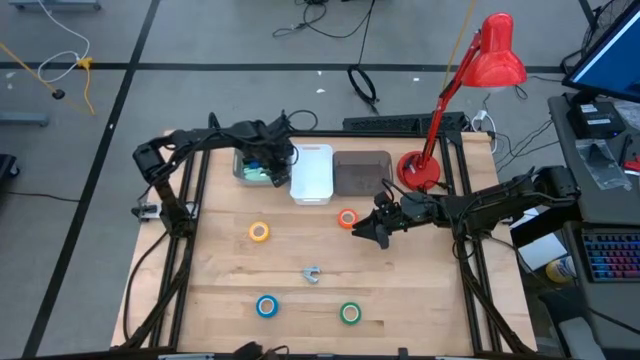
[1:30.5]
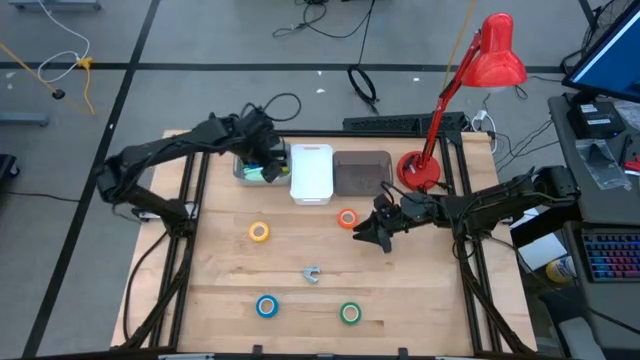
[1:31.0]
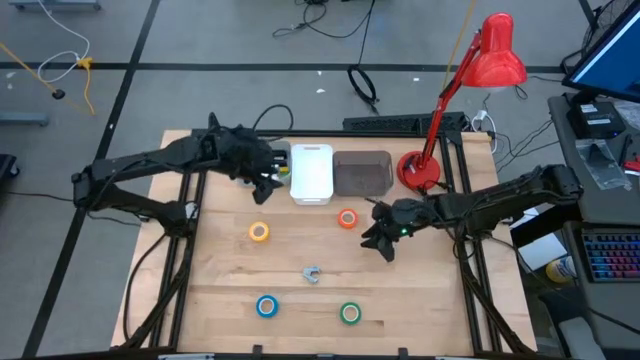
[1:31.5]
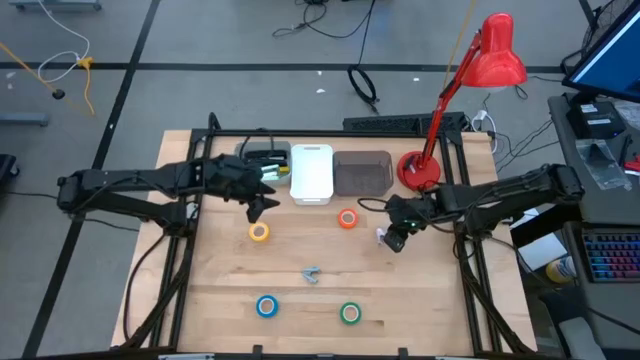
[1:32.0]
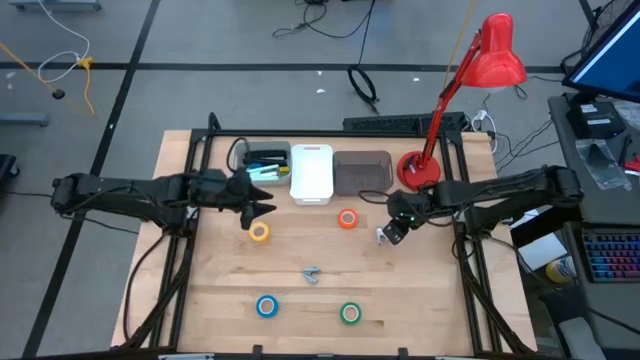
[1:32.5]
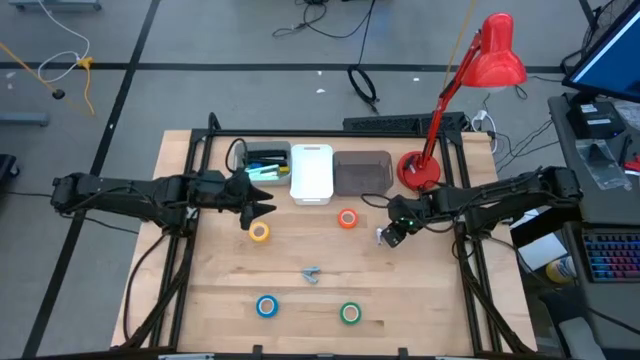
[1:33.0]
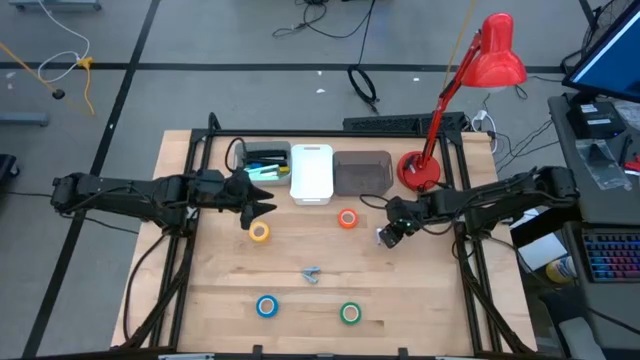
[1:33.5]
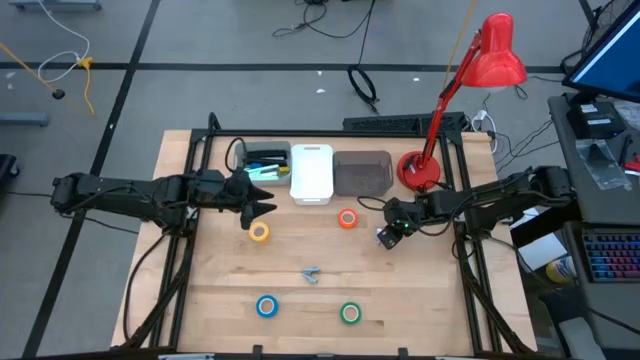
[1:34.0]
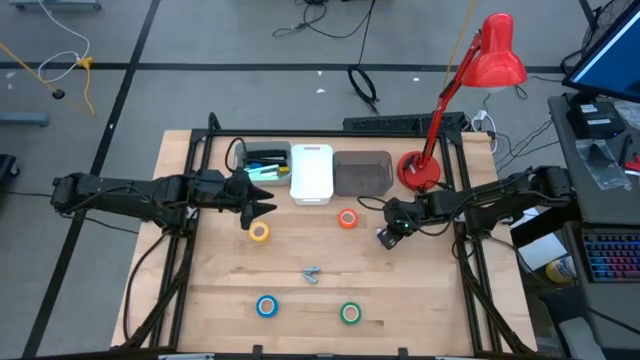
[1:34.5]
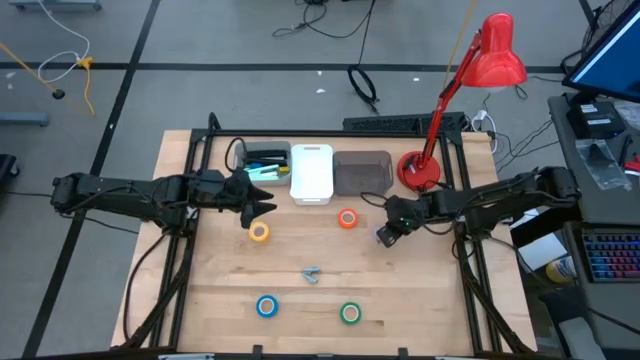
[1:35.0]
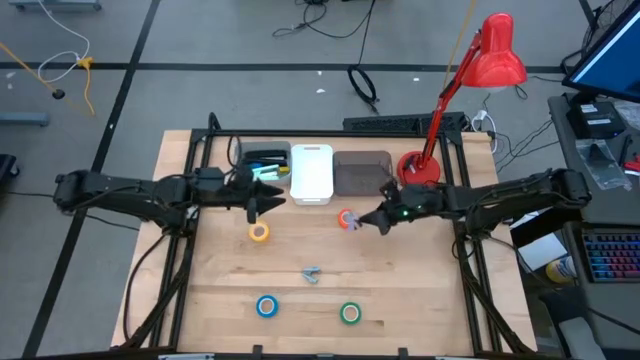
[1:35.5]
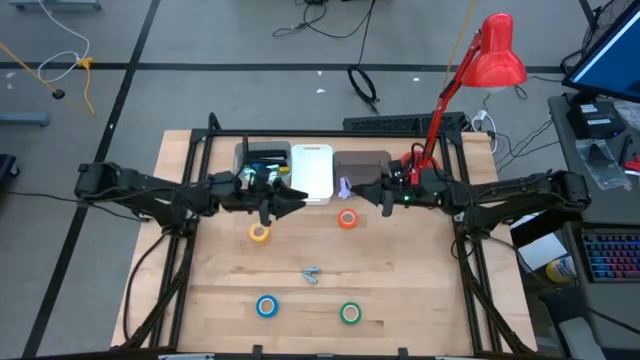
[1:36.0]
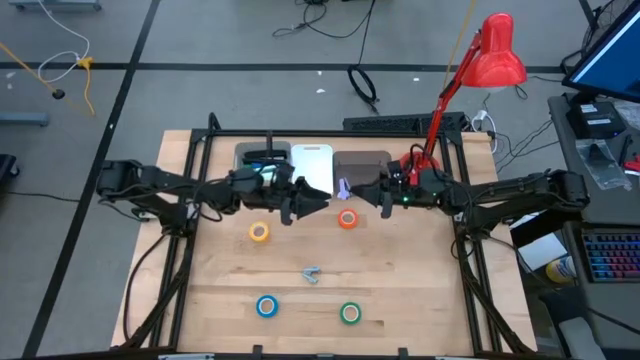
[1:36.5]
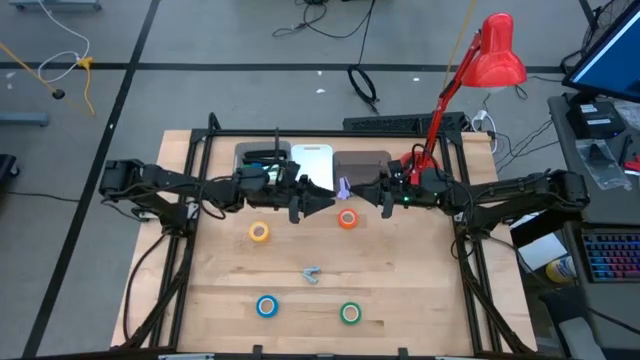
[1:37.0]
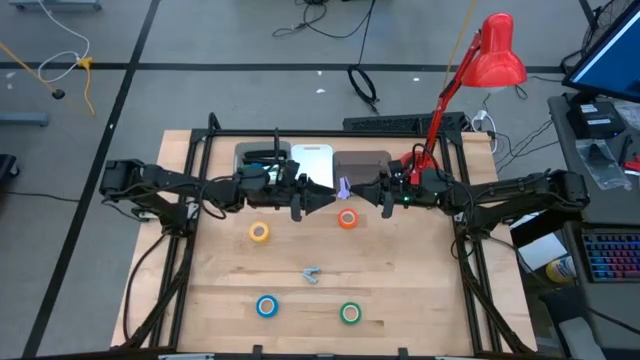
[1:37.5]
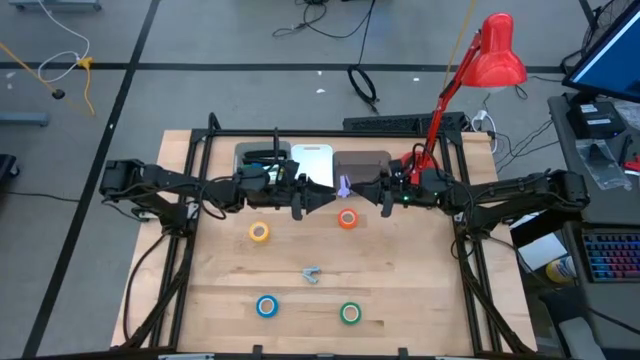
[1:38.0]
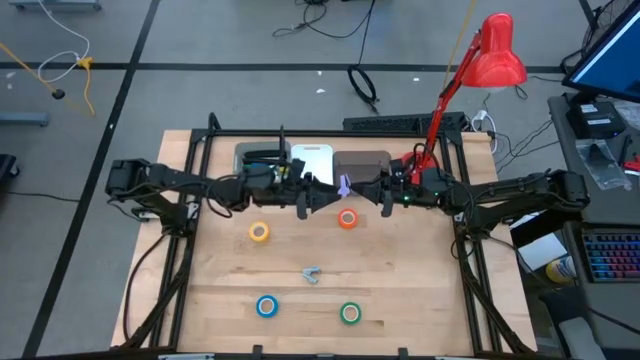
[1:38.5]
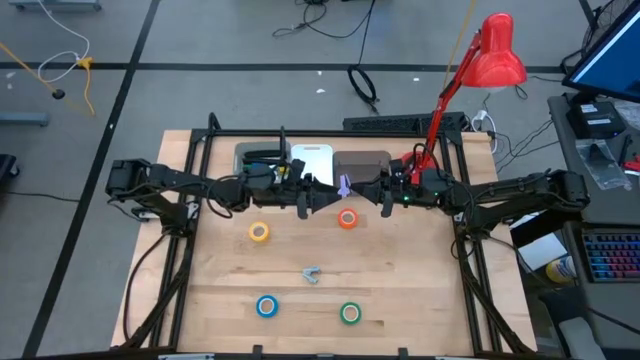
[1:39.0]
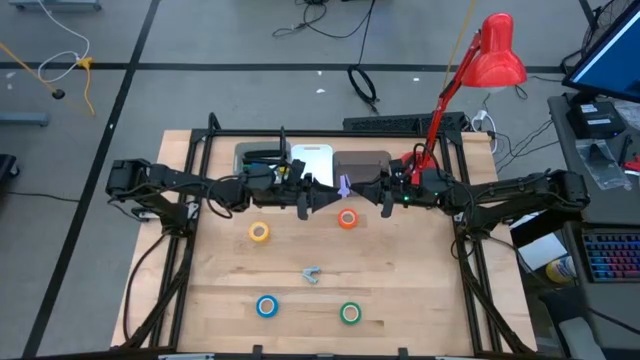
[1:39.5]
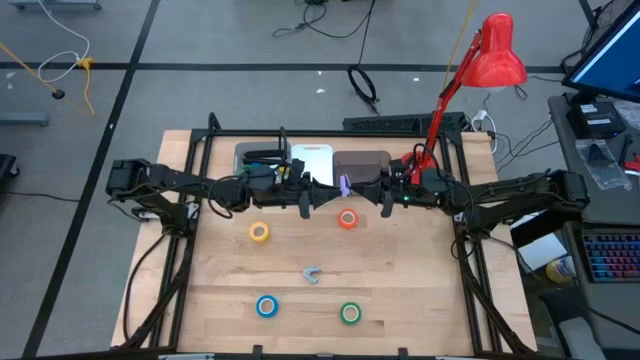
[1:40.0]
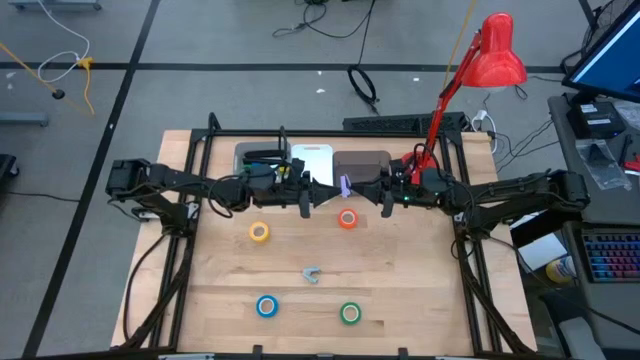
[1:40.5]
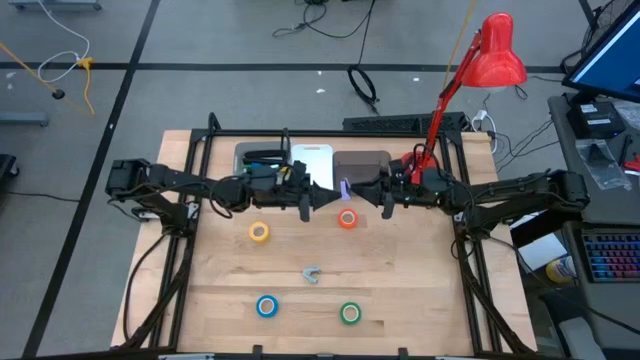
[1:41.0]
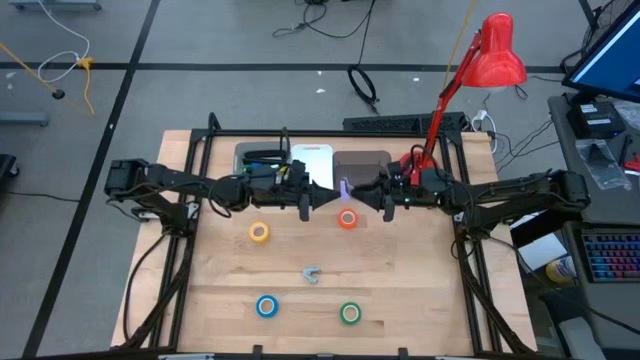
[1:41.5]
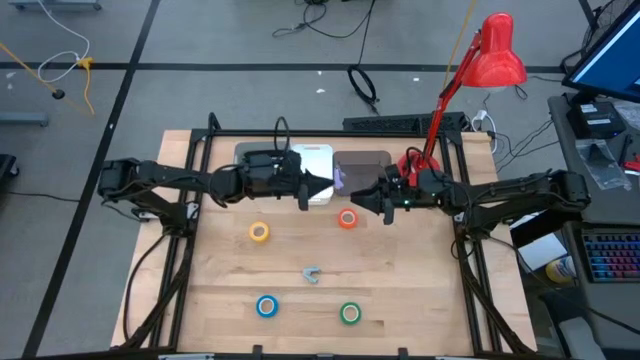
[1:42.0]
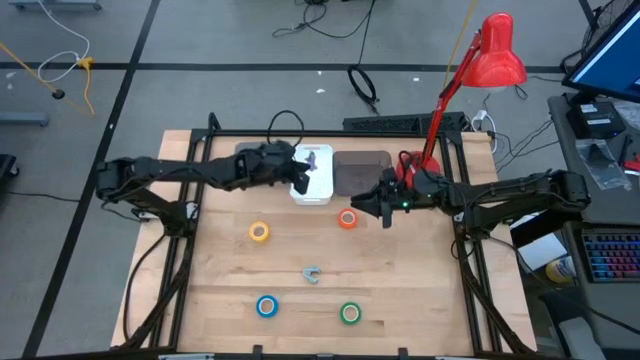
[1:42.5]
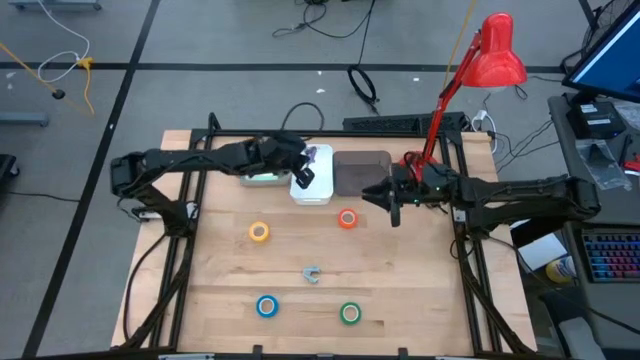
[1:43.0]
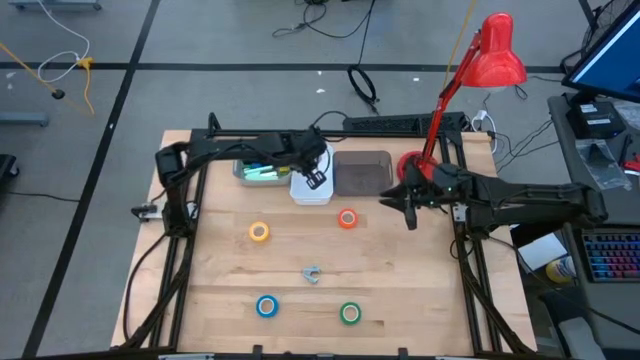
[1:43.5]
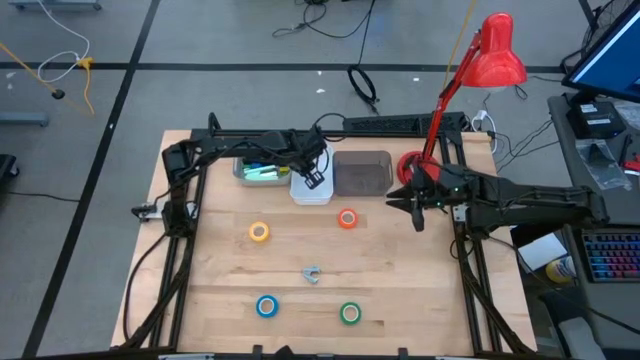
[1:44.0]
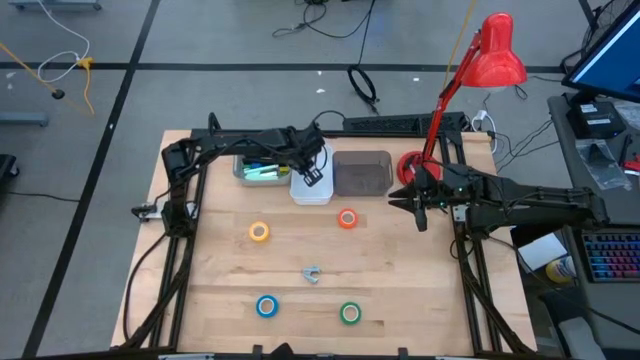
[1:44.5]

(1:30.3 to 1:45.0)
Task: Pick and place Stapler, Stapler remover, tape
Put the purple staple remover into the white bin

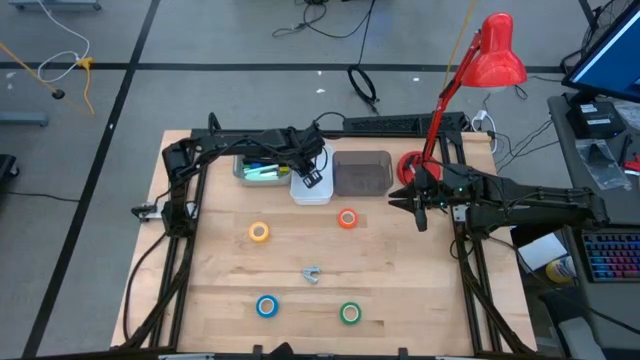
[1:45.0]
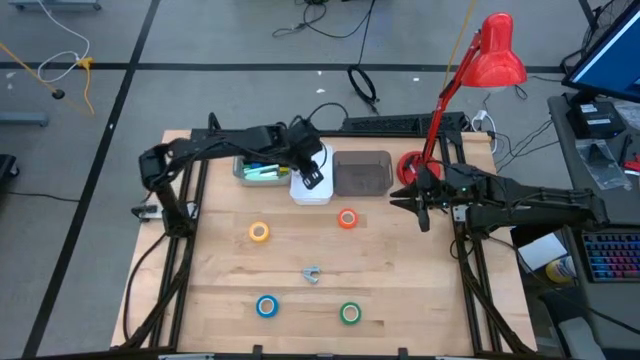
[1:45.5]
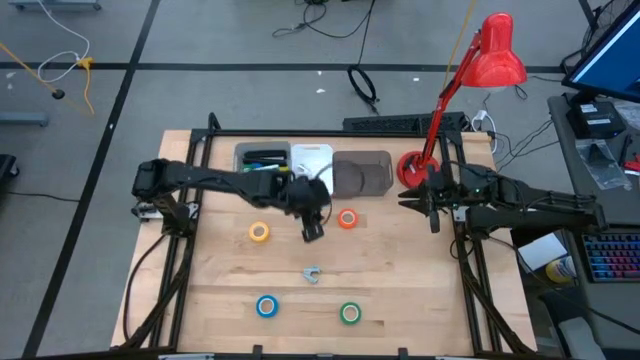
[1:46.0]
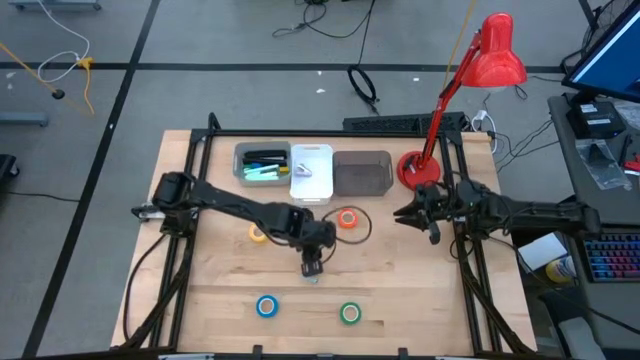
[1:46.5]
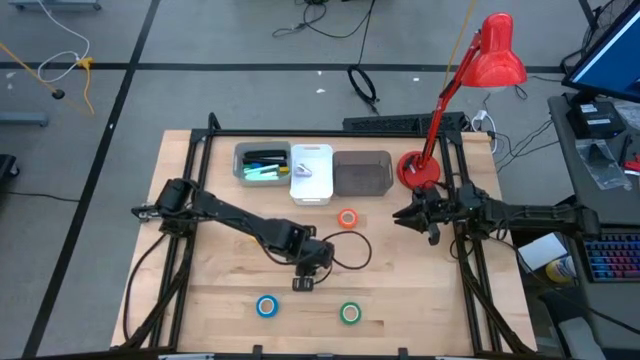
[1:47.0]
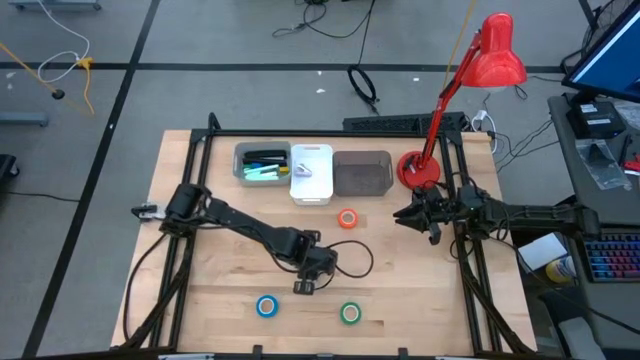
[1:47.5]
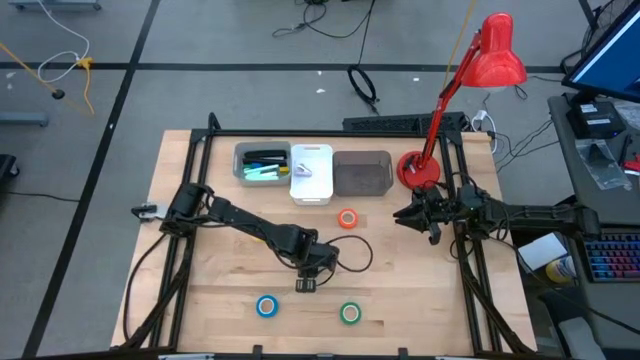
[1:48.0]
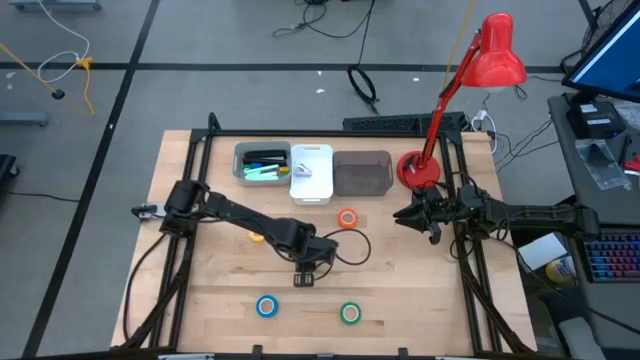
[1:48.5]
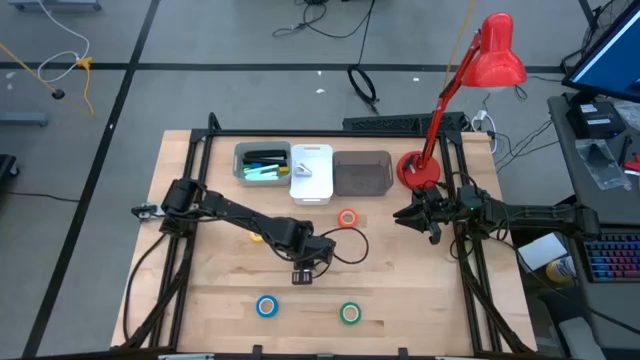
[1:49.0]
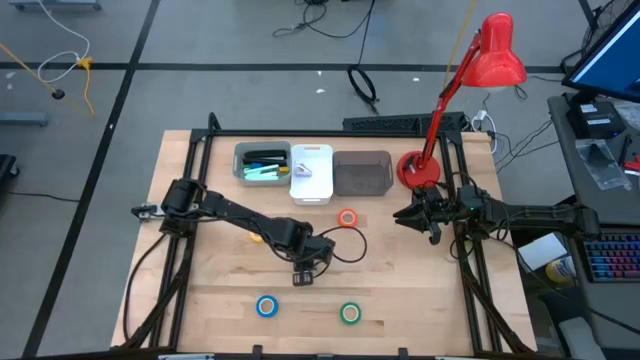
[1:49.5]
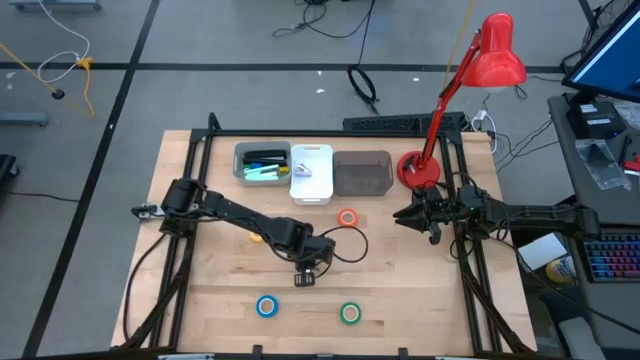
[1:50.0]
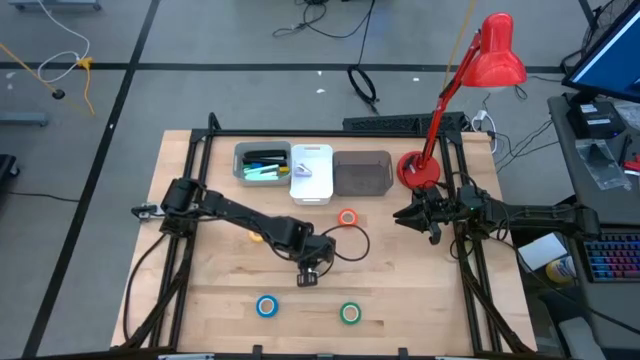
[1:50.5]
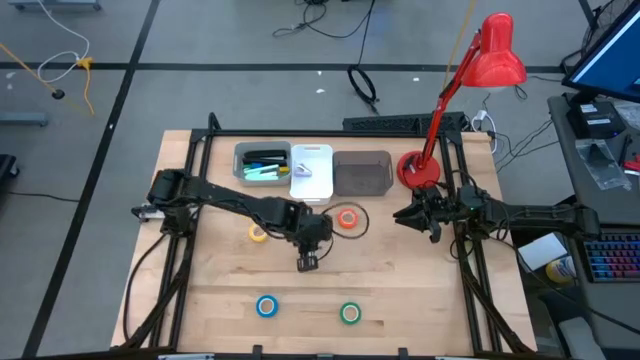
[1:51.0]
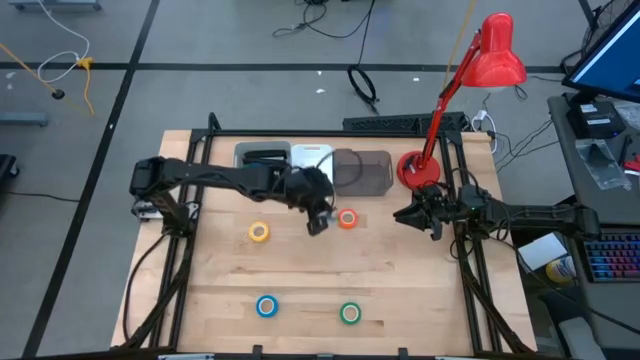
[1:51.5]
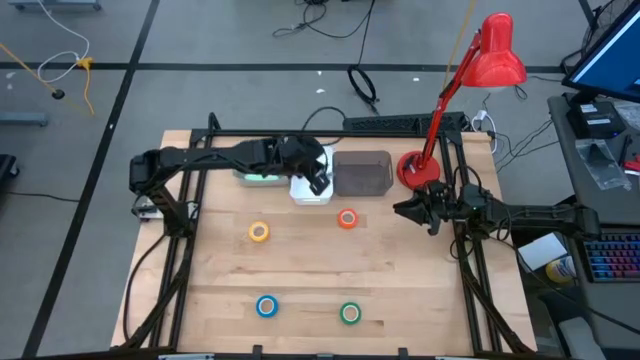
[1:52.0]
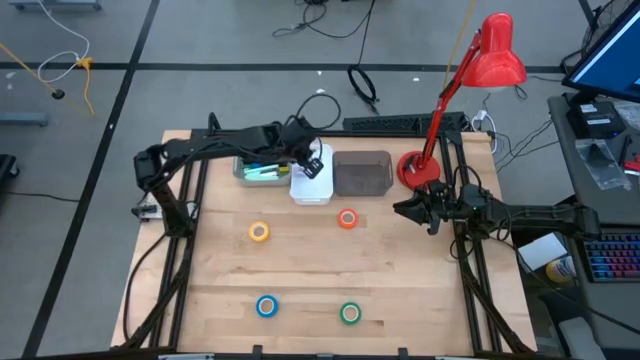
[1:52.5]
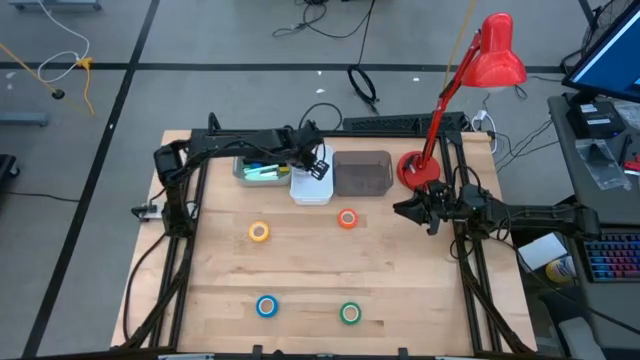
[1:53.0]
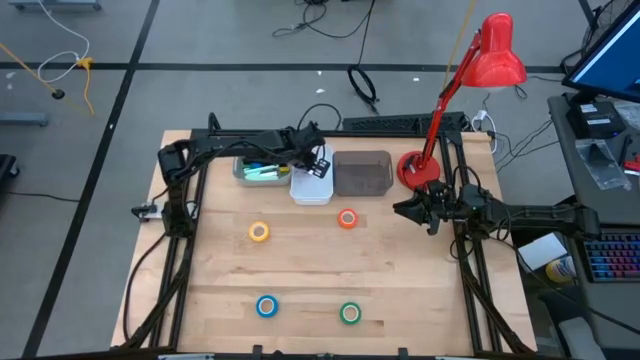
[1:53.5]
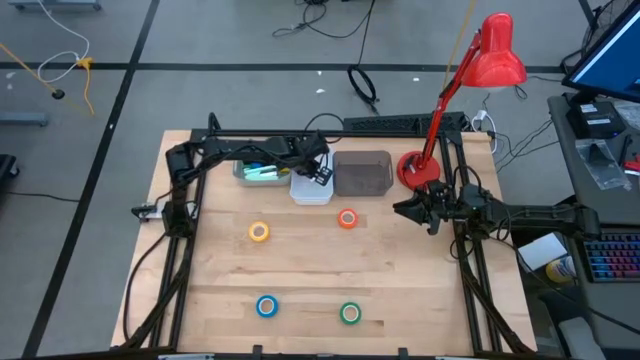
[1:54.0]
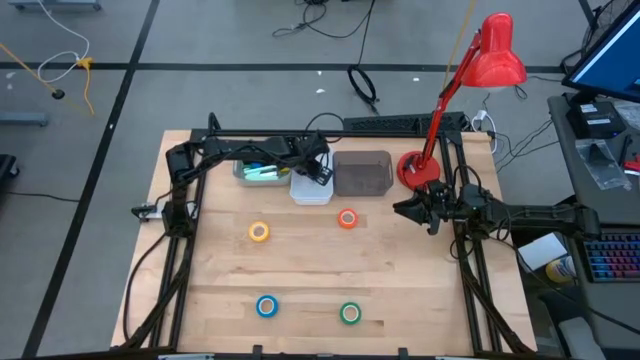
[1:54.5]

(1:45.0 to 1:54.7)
Put the gray staple remover into the white bin
